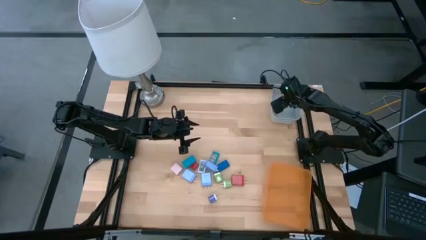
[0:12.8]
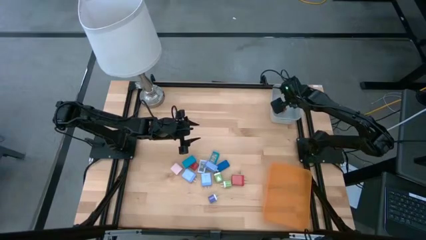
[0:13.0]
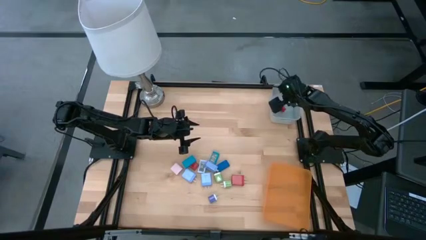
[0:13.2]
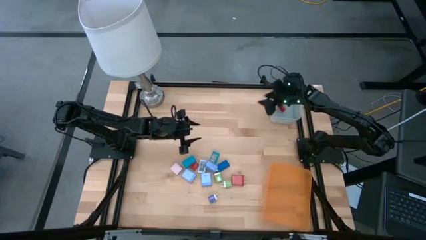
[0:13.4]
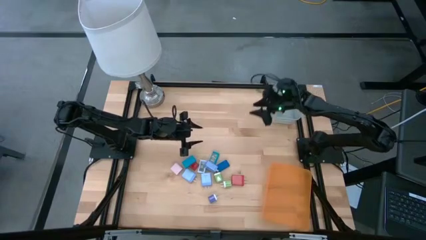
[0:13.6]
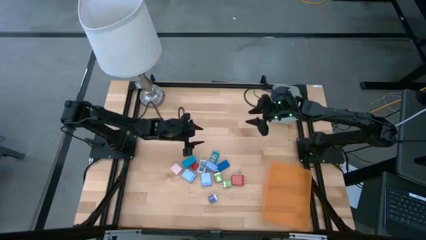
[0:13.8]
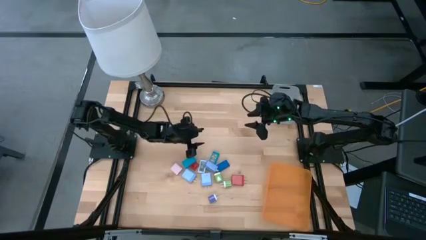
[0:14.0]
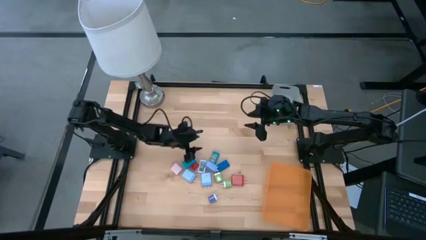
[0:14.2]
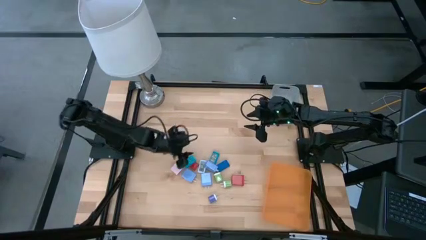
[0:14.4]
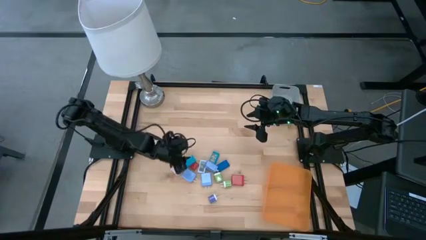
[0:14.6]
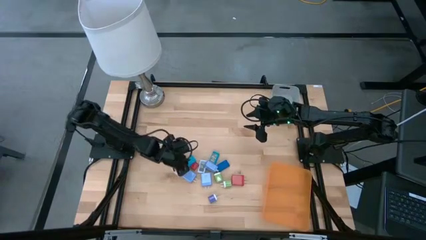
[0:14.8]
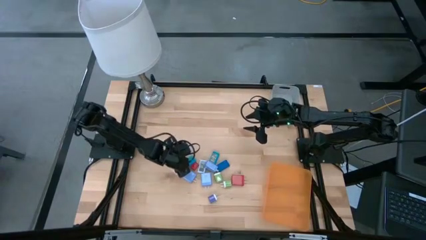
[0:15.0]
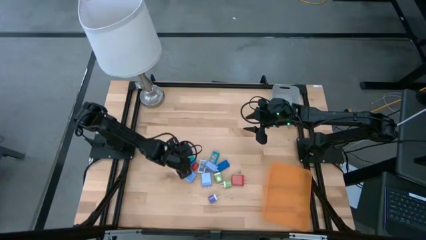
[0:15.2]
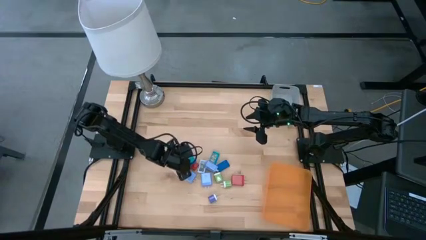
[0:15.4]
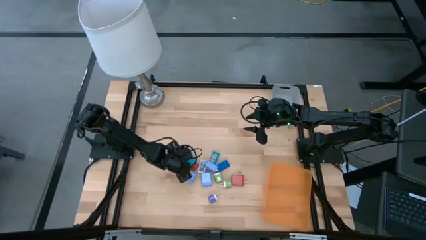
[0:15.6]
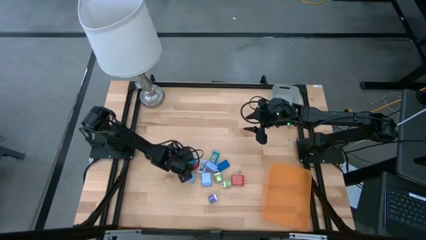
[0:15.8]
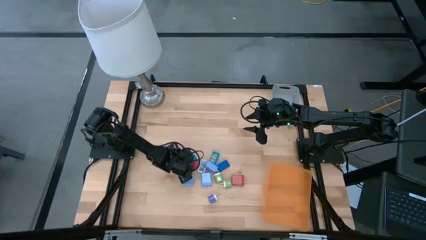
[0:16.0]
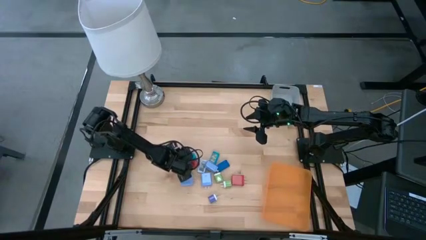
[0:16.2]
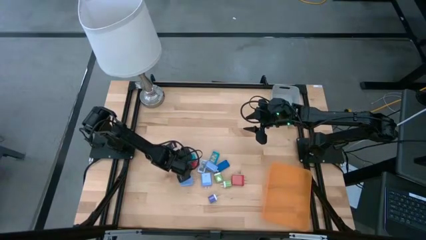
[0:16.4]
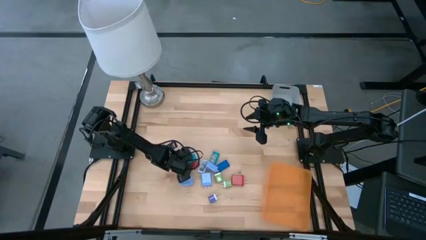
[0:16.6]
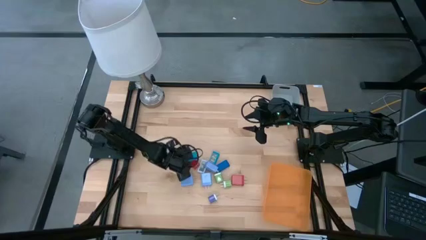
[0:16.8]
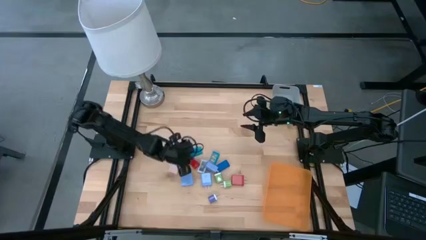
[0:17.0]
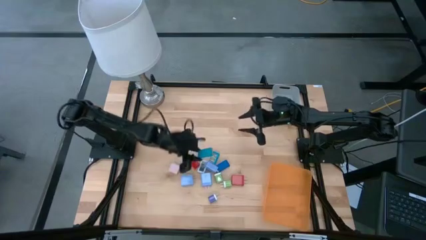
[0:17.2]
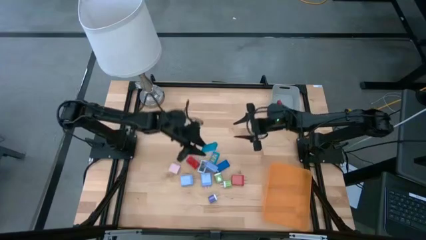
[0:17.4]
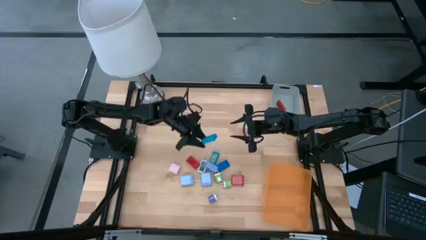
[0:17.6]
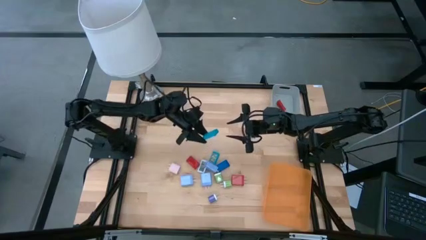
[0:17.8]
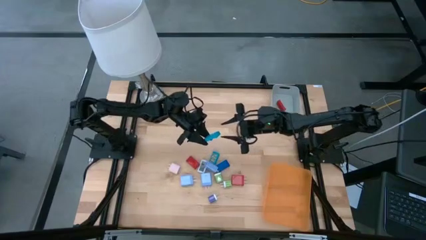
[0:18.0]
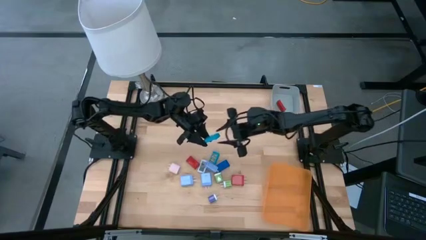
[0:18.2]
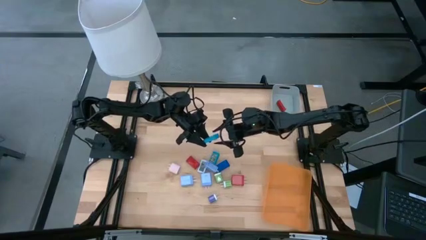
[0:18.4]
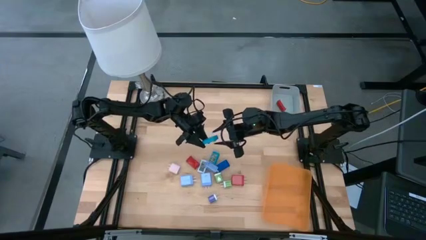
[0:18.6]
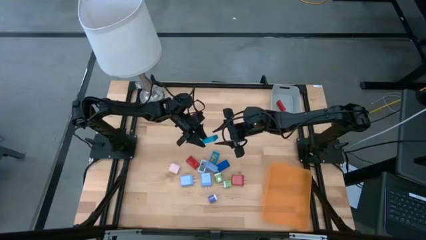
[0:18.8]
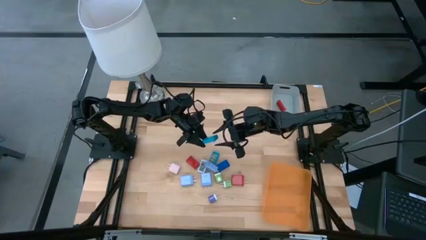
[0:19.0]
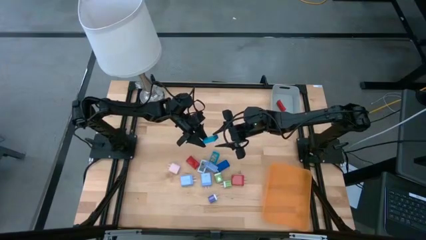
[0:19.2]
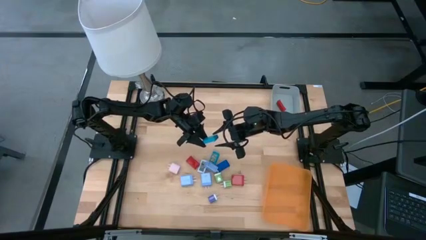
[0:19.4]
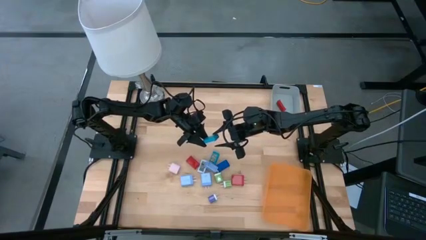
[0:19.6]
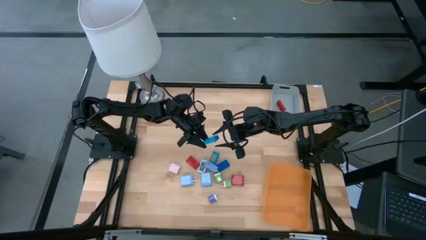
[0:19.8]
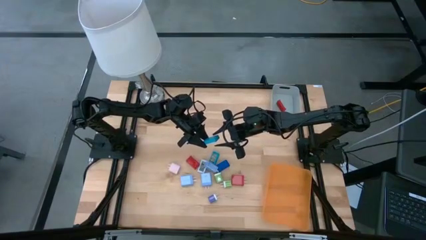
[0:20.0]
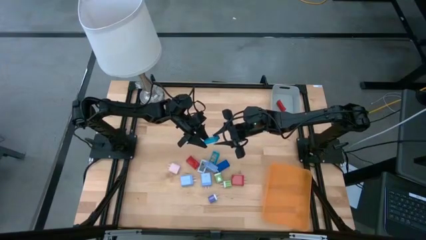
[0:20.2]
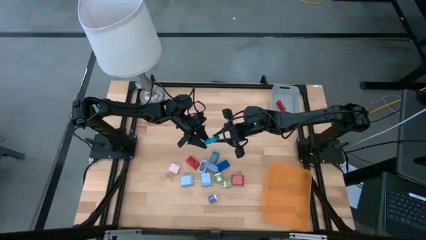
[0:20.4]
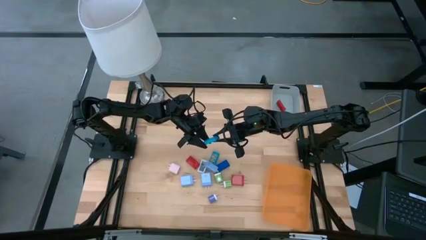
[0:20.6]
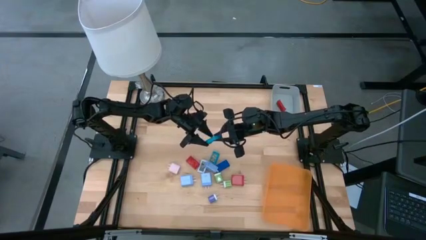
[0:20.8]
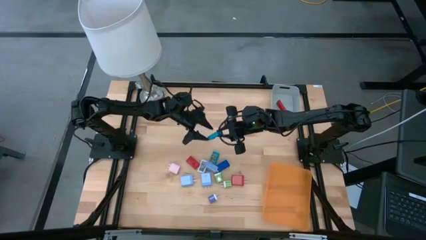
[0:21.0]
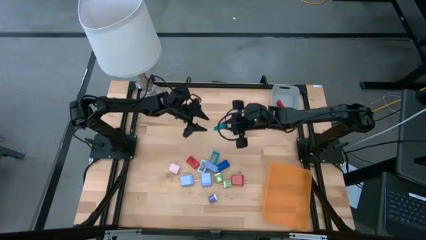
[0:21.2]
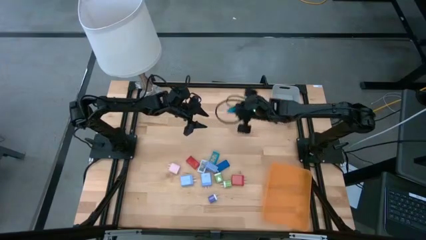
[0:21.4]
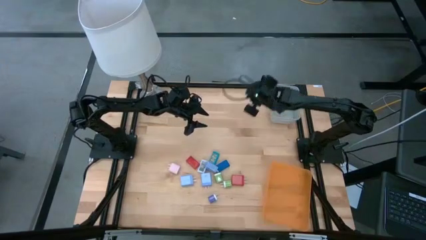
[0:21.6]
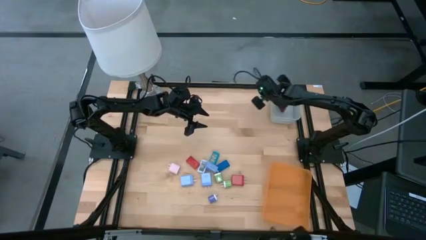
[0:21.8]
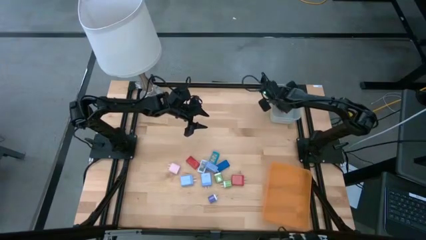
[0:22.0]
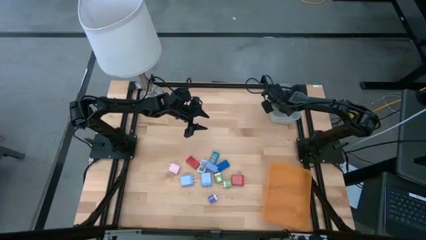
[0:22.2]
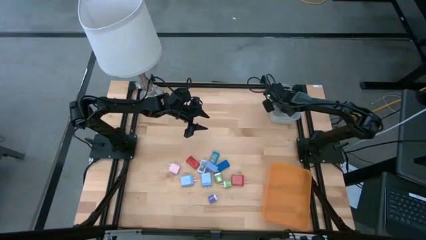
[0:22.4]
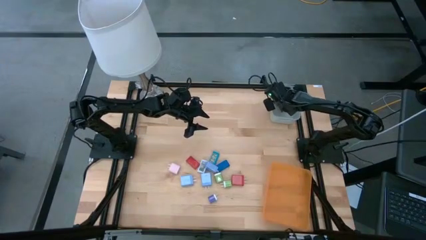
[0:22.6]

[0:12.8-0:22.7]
Task: Pick & Place Office items
Put the left light blue digital clock into the gray bin

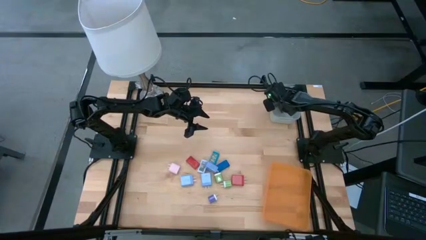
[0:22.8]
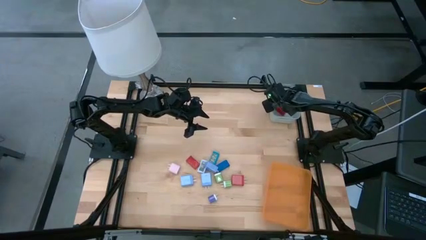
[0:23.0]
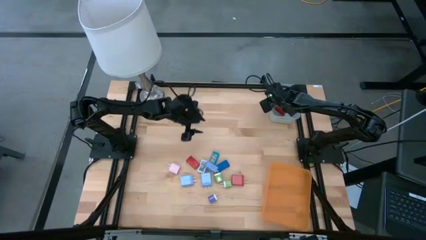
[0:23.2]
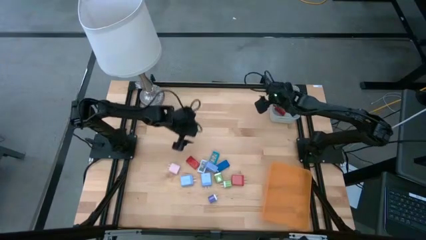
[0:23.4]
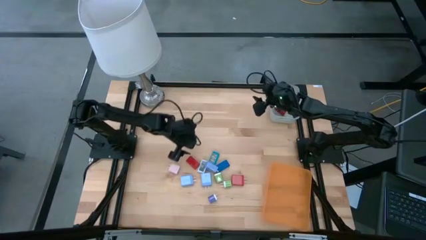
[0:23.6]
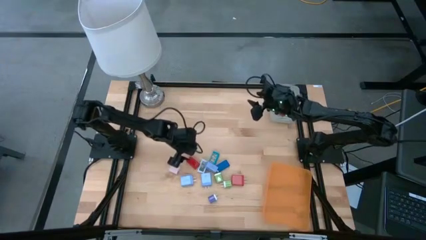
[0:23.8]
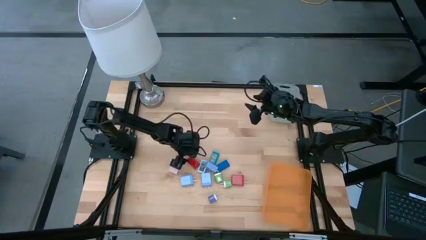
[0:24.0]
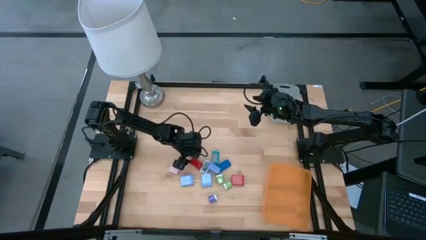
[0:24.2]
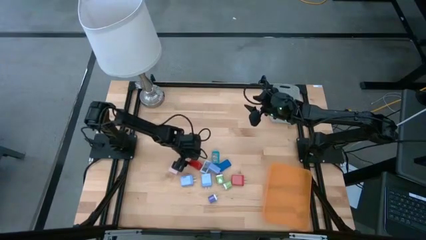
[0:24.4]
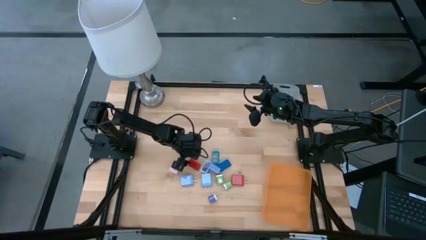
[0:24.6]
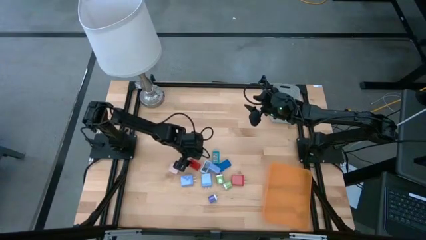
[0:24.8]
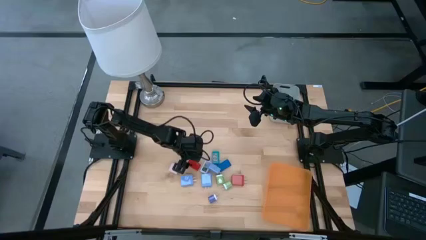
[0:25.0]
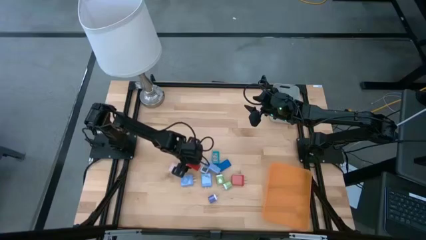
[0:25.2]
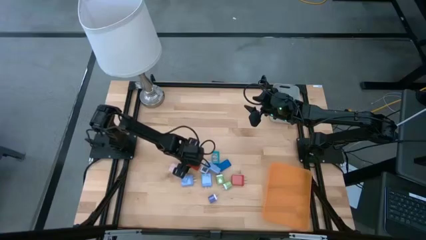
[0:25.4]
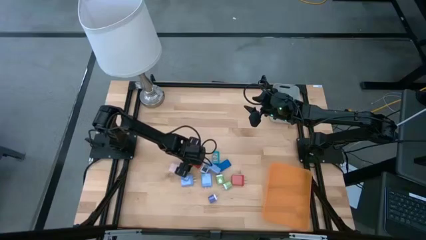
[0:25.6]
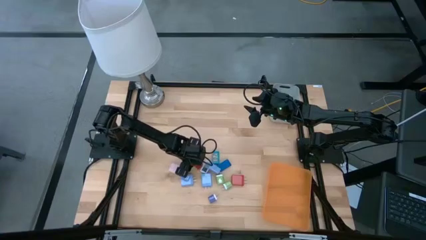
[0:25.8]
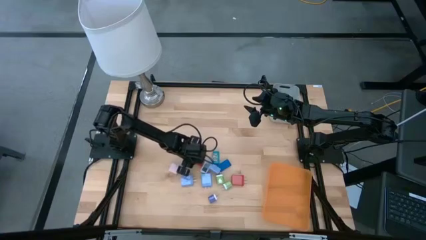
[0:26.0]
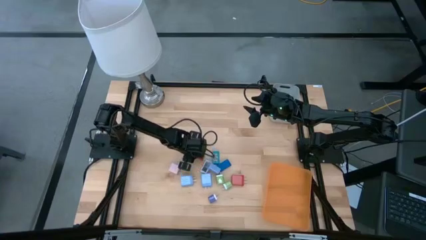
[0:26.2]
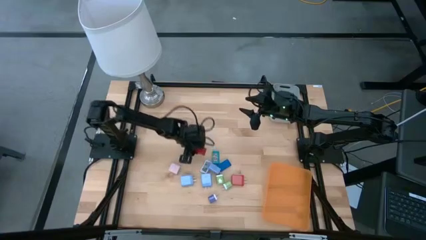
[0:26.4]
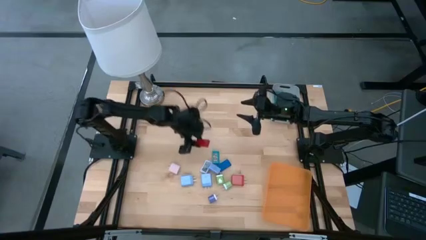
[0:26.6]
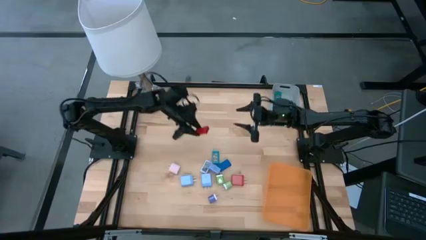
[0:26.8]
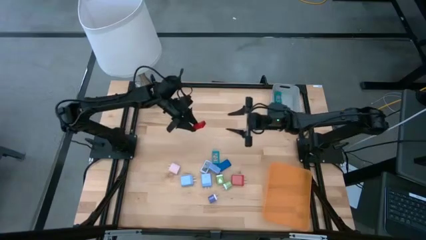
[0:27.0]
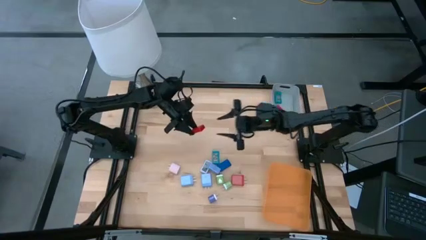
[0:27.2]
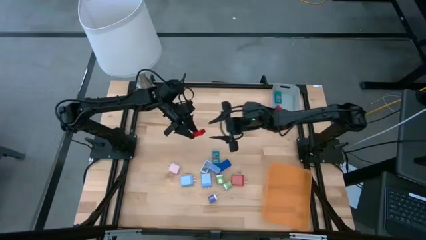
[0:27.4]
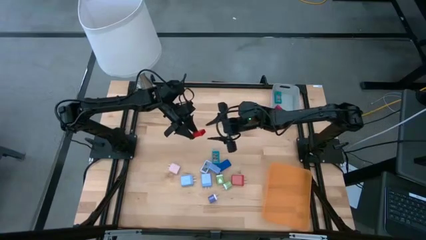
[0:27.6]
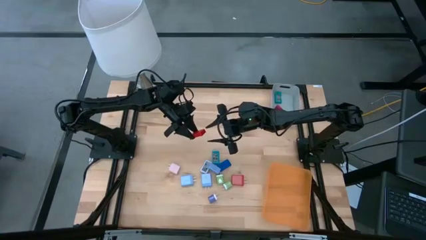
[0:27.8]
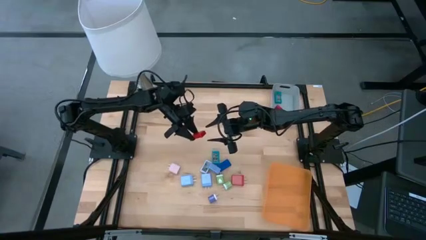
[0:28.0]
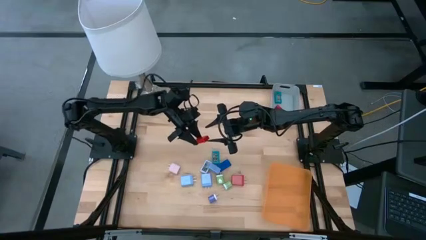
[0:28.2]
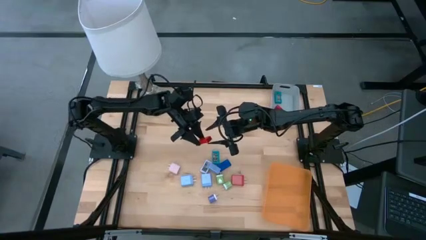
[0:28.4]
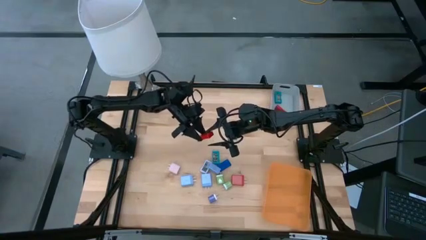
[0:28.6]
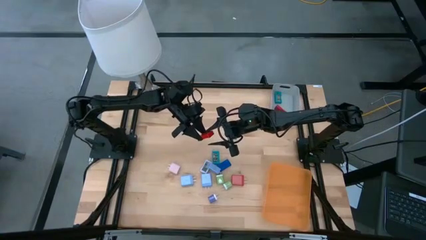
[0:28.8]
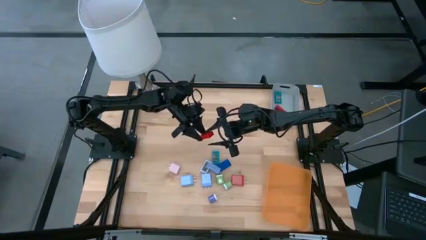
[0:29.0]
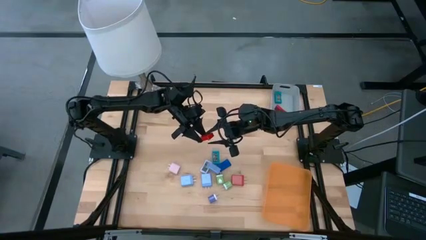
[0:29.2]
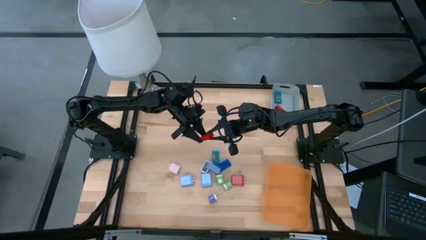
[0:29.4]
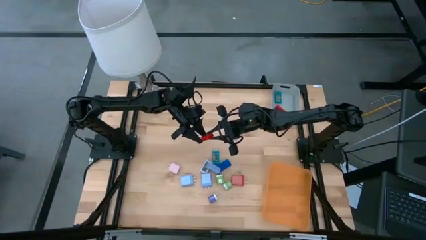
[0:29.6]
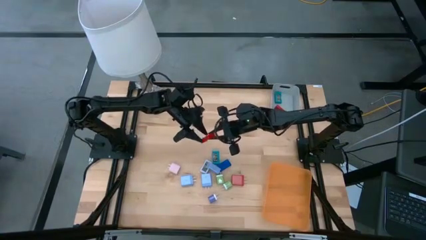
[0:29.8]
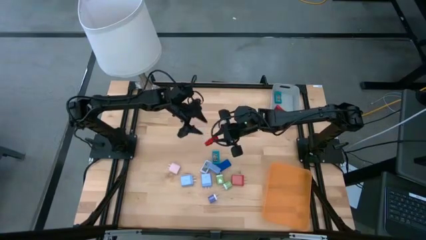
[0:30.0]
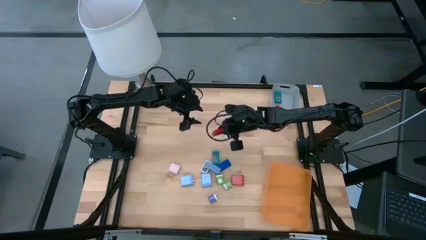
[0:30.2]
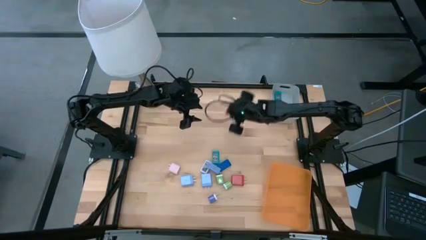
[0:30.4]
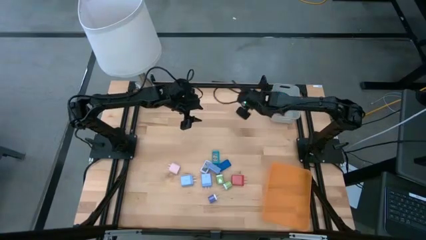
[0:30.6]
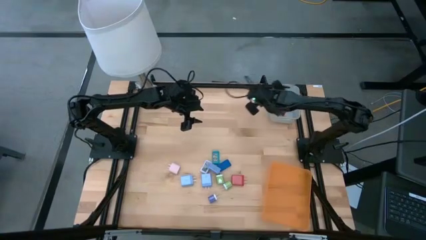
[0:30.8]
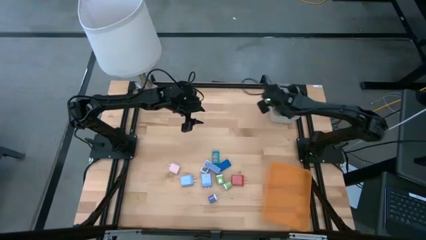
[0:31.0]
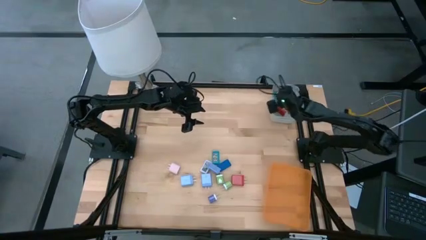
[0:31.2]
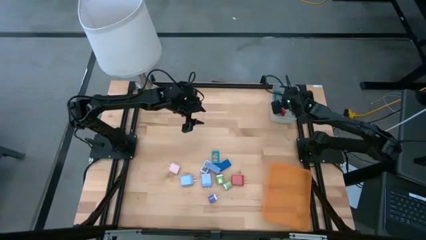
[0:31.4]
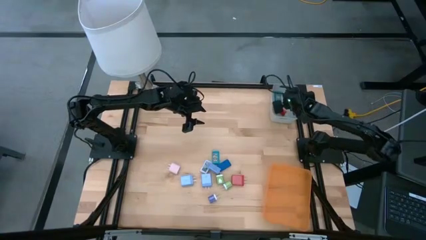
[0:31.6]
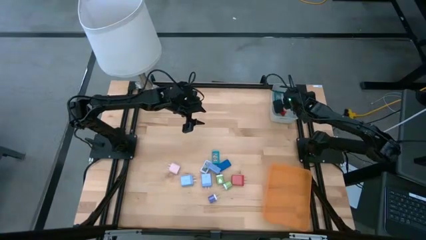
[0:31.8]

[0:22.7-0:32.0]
Put the red digital clock into the gray bin
